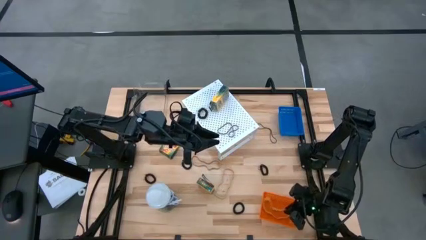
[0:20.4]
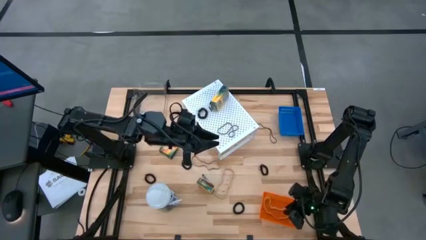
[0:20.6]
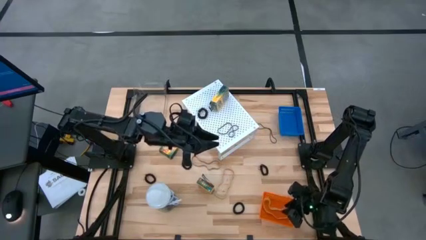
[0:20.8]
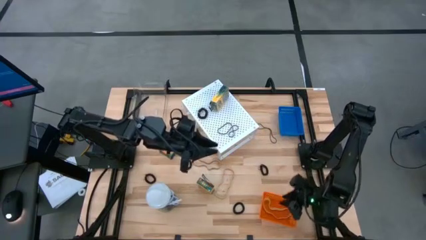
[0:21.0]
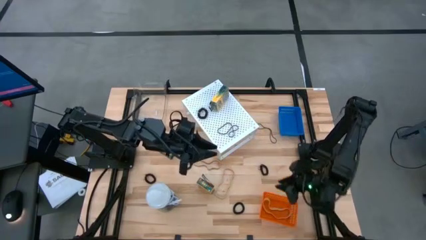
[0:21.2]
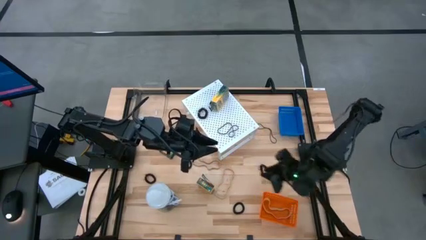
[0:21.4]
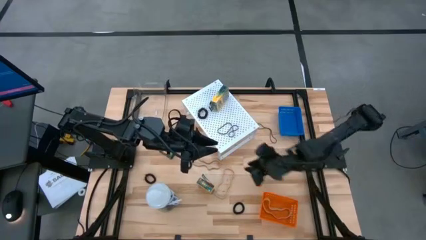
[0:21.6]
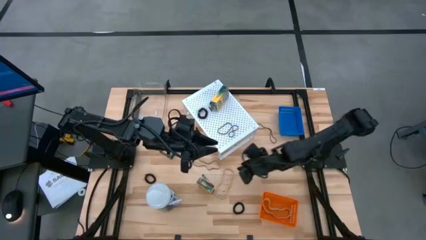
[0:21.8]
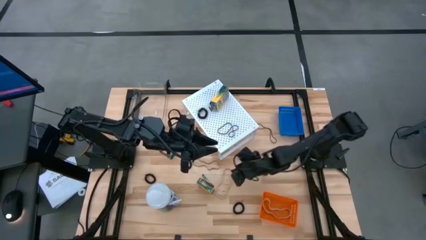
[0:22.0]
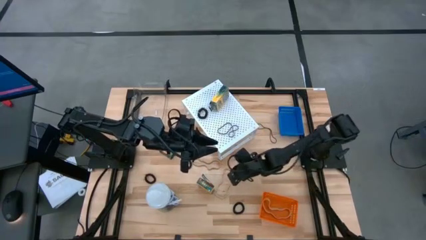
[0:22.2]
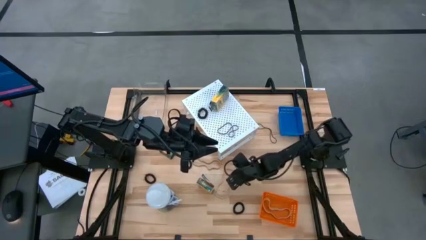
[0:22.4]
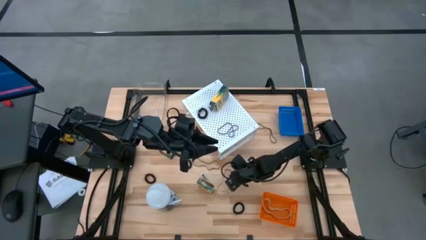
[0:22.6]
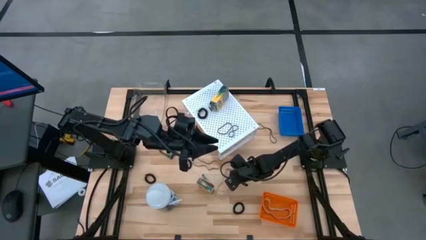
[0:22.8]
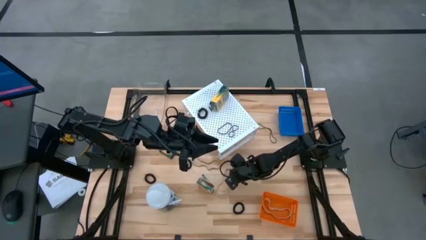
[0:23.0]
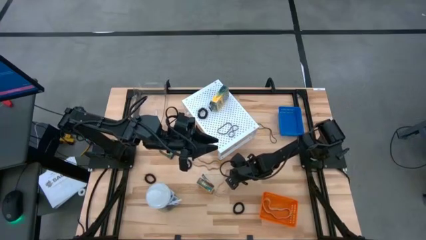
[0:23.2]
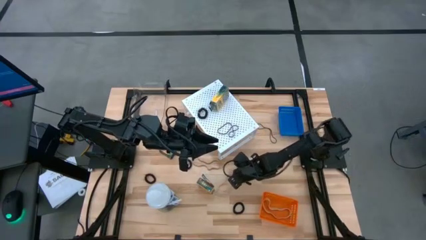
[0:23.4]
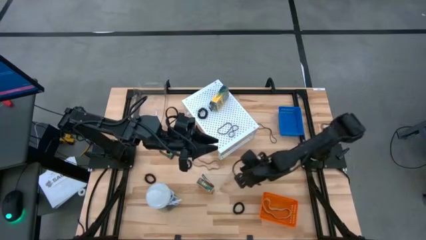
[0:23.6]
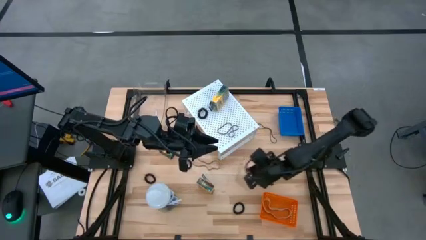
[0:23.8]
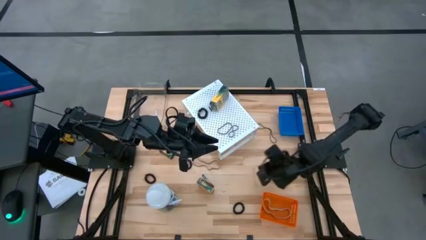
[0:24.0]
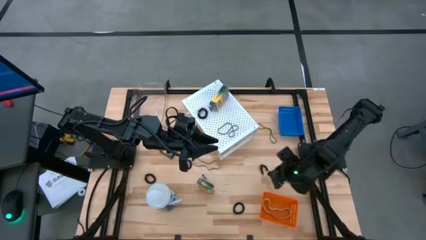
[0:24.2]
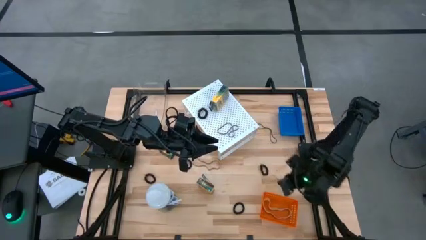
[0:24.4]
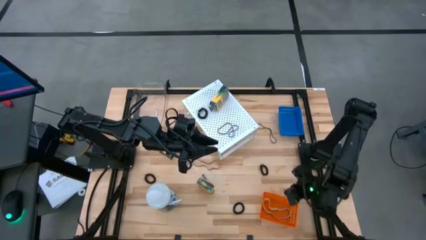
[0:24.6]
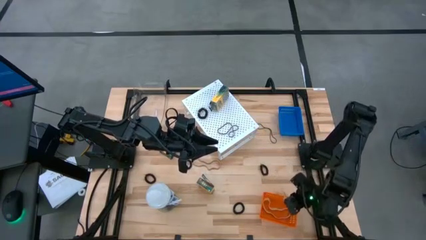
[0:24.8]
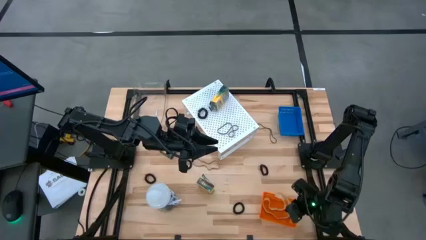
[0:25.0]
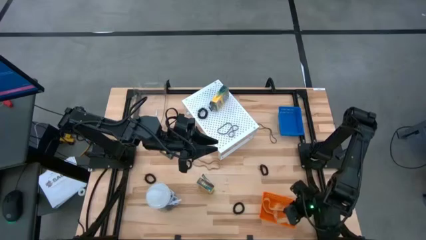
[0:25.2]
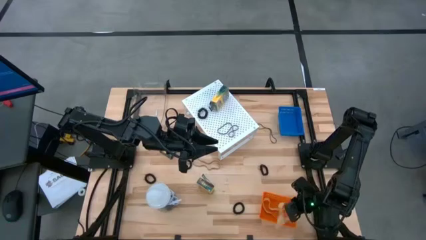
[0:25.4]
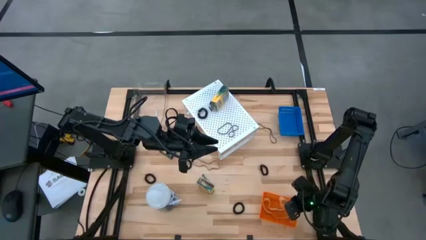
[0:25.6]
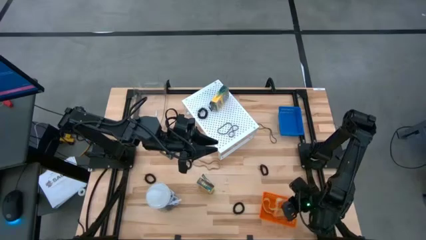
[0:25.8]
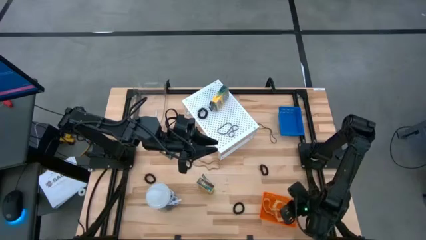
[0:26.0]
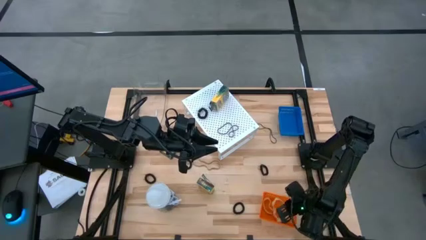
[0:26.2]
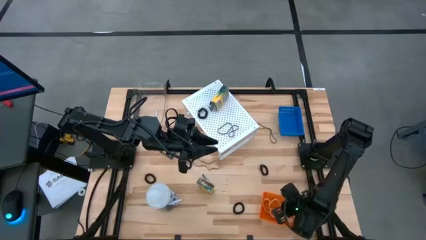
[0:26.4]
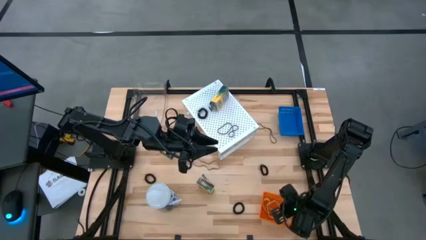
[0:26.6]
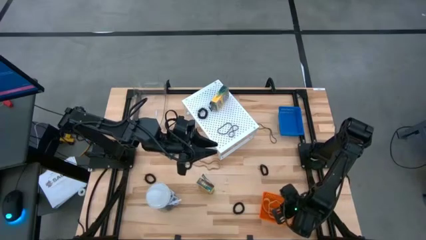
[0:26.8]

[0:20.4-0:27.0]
Task: Pick & Place Office Desk Supplies
Put the brown rubber band into the orange bin

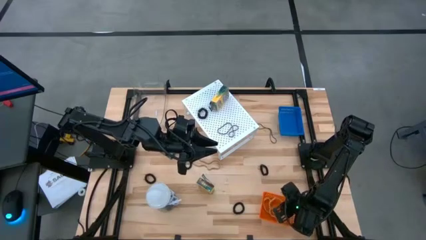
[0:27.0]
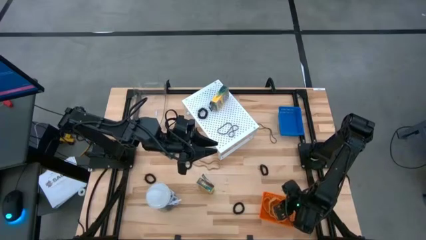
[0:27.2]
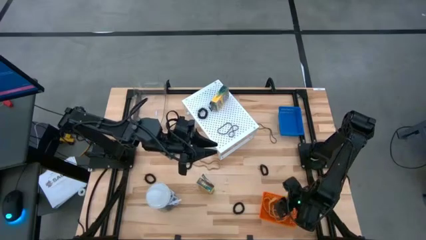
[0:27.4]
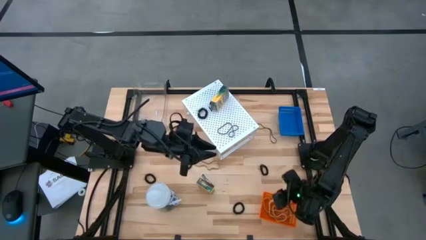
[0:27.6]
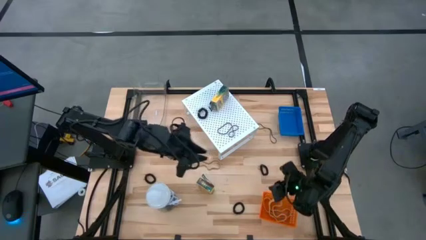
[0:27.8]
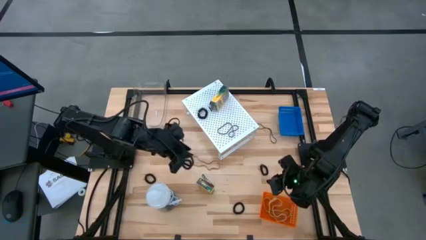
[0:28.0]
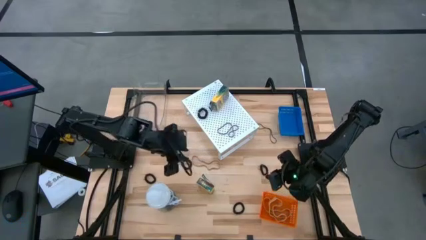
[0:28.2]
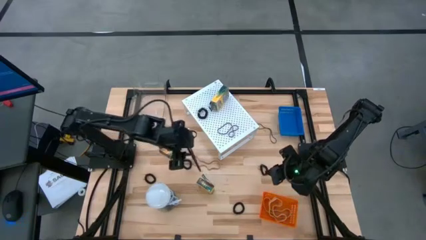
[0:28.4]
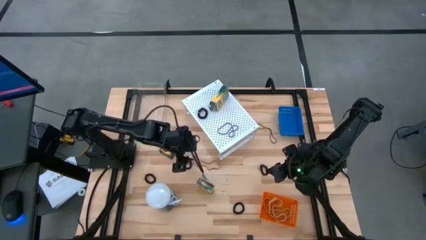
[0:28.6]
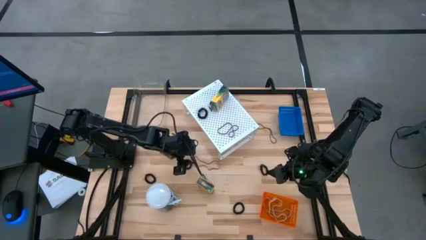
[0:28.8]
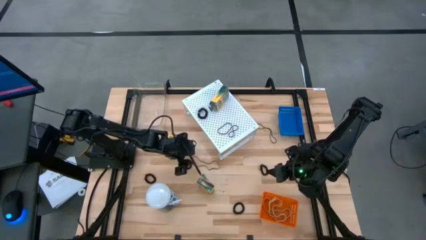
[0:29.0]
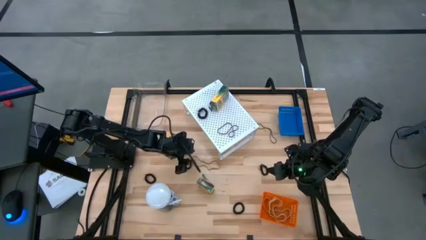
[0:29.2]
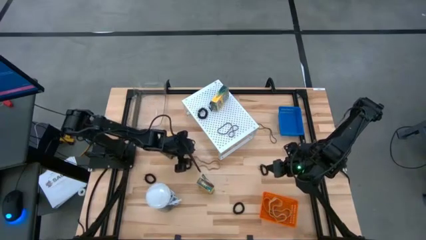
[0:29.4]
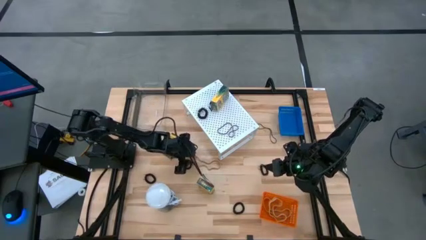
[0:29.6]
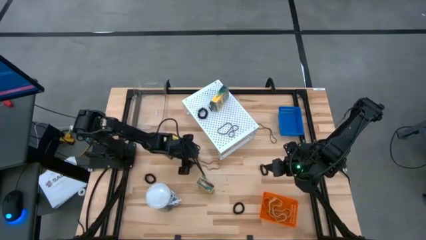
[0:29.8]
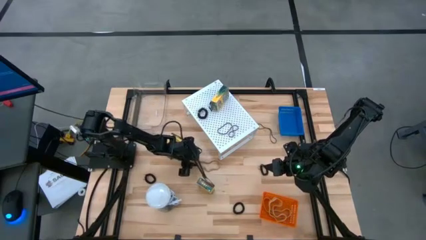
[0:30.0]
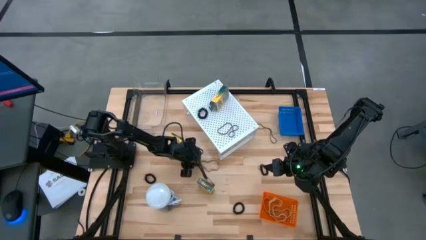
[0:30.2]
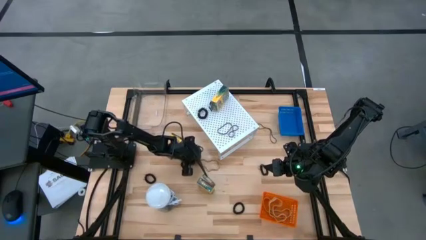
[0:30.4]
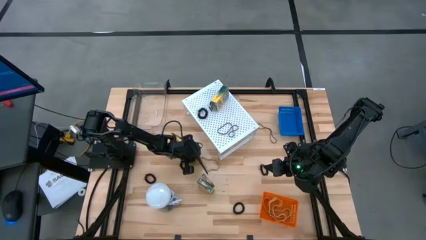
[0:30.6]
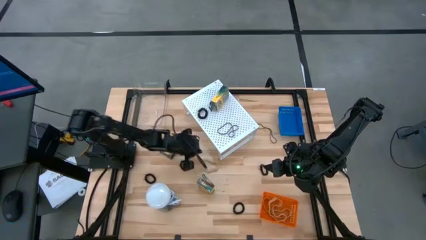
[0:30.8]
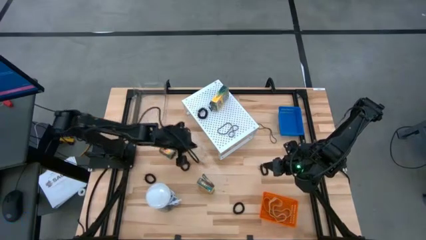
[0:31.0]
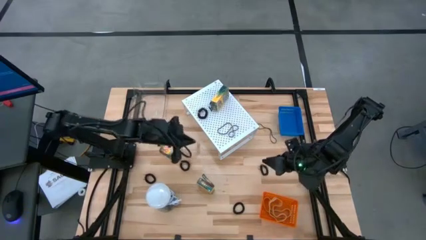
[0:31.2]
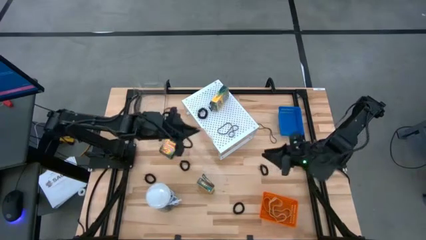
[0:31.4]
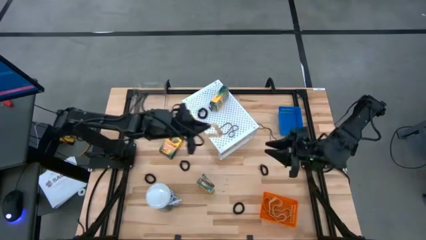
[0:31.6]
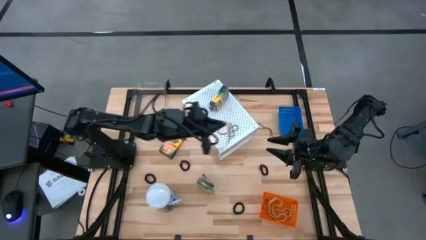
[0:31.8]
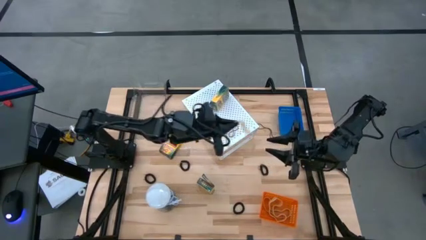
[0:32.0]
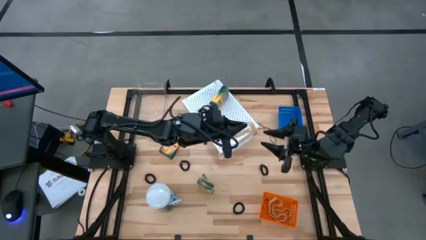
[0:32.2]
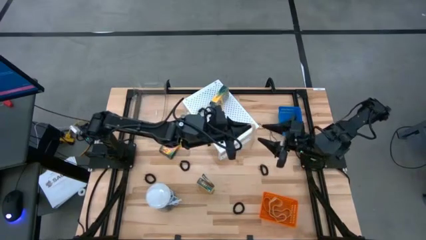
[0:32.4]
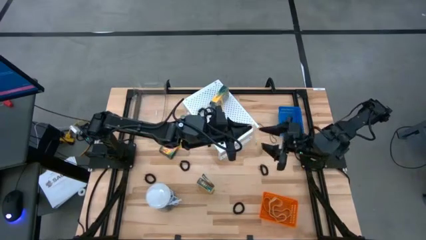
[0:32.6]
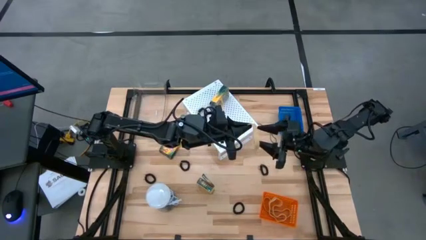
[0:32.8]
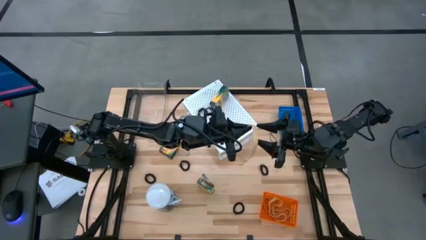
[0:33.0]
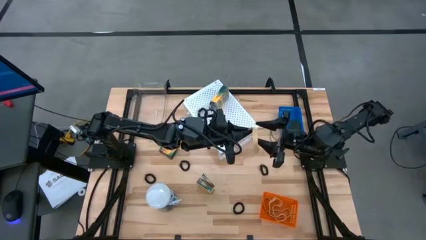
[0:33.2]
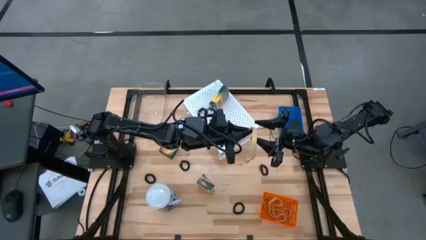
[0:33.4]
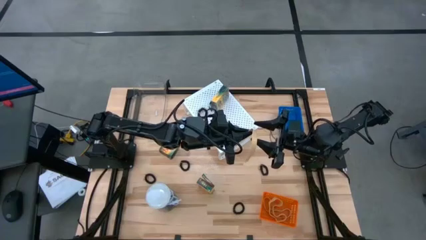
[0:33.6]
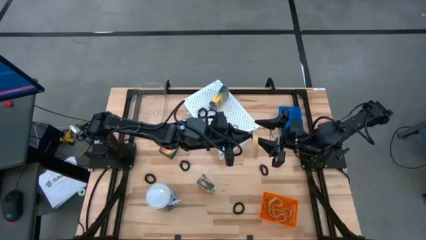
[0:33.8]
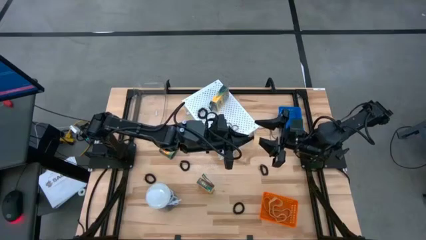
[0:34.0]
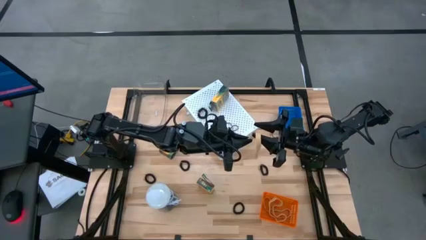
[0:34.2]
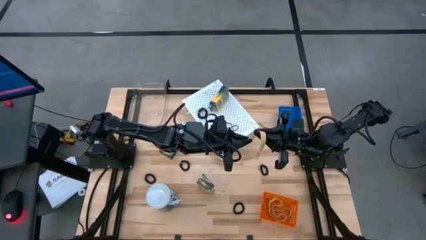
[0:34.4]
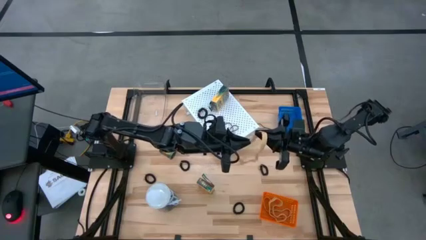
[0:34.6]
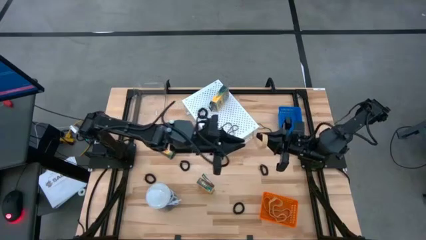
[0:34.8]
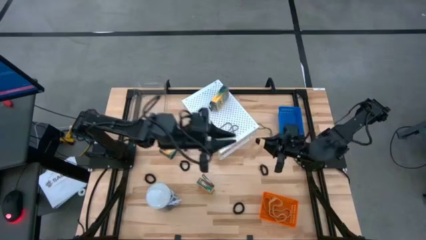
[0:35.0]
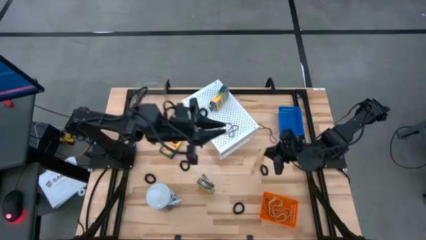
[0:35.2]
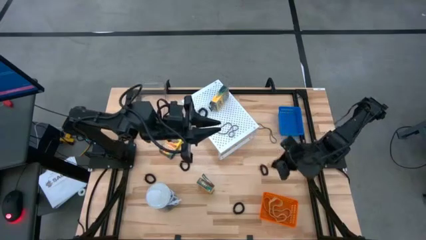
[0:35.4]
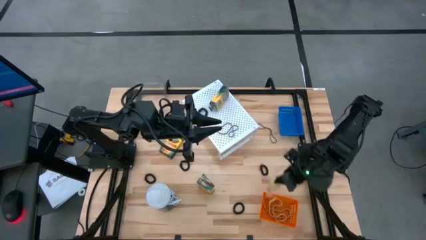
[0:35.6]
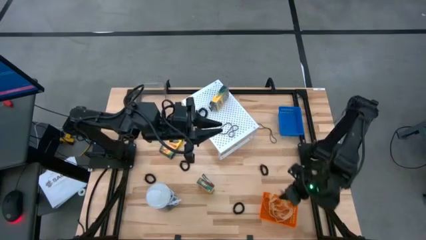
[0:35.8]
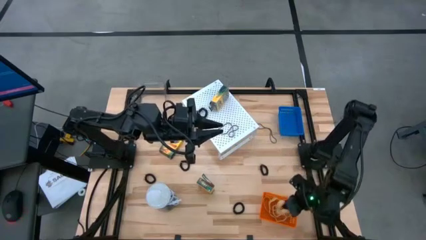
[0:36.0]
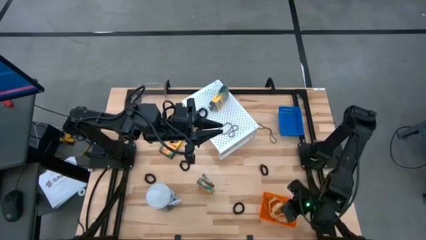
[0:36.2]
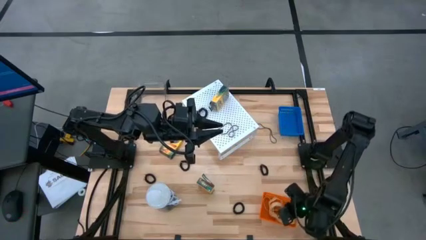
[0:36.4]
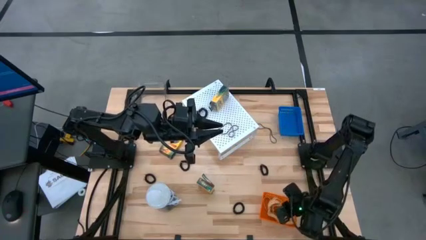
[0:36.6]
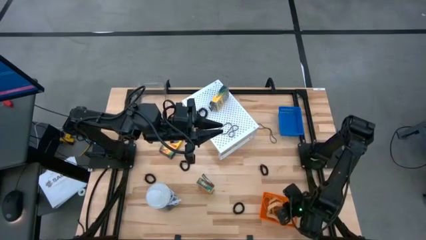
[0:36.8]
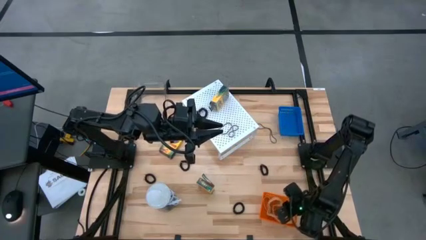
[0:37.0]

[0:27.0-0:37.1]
Put the brown rubber band into the orange bin
